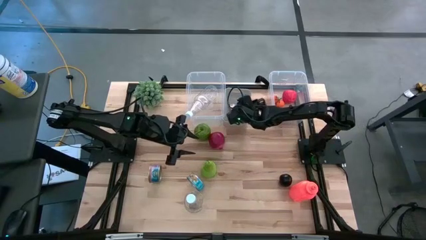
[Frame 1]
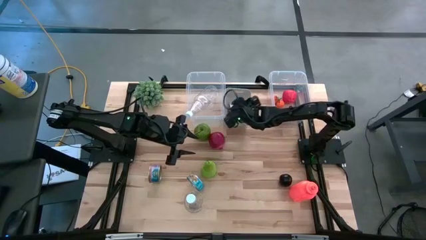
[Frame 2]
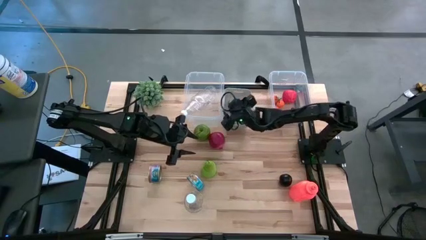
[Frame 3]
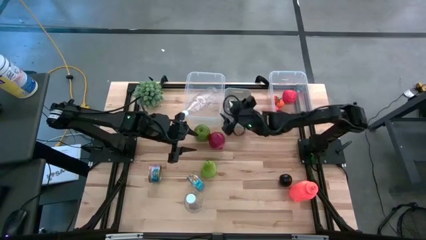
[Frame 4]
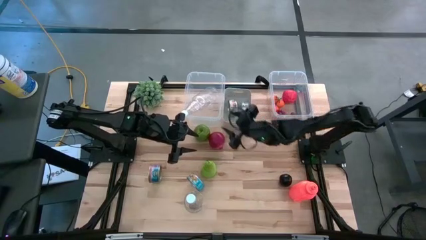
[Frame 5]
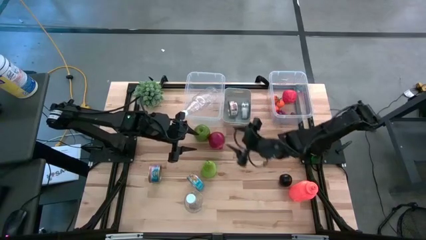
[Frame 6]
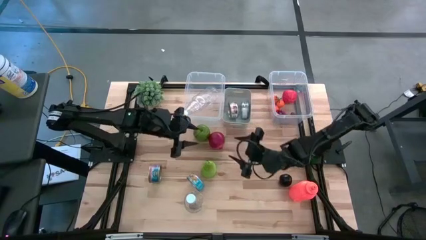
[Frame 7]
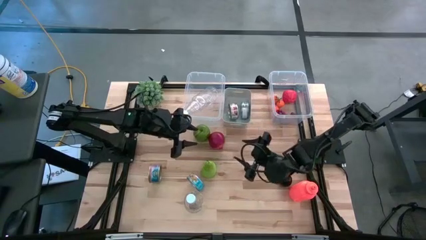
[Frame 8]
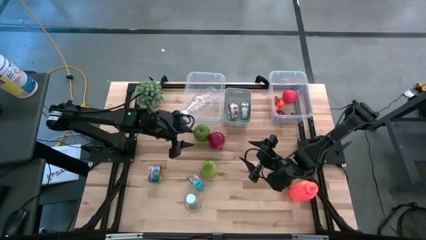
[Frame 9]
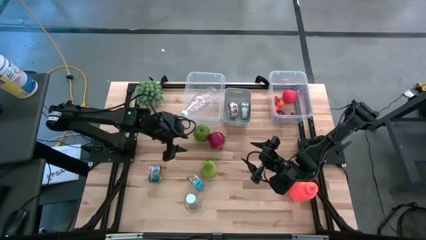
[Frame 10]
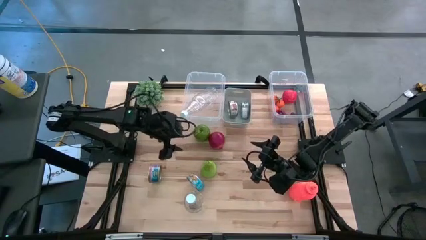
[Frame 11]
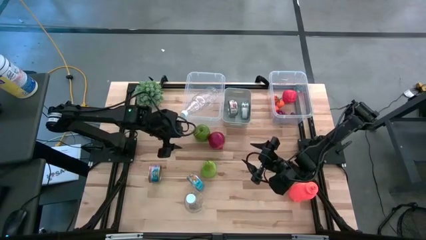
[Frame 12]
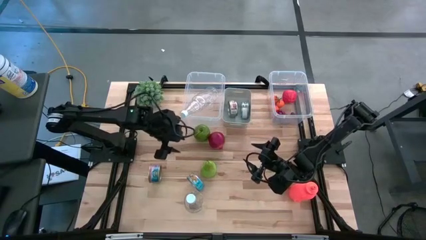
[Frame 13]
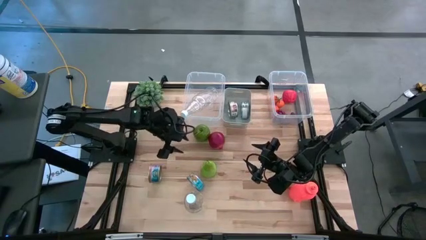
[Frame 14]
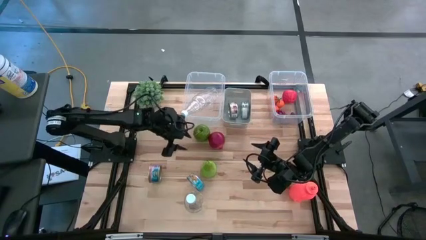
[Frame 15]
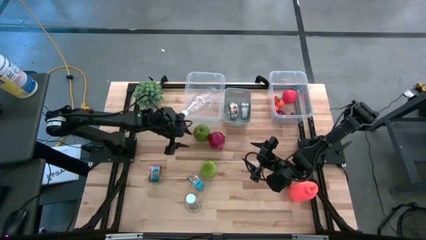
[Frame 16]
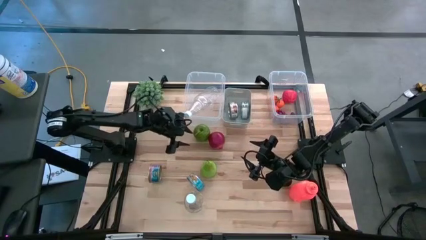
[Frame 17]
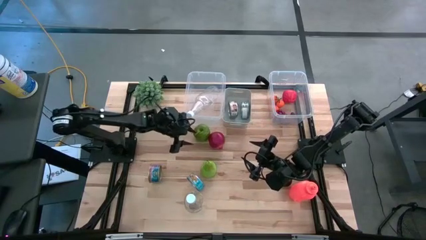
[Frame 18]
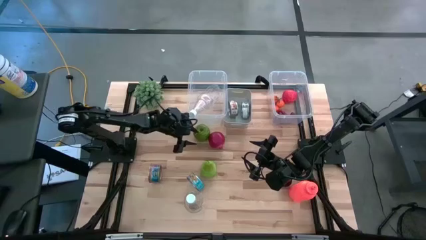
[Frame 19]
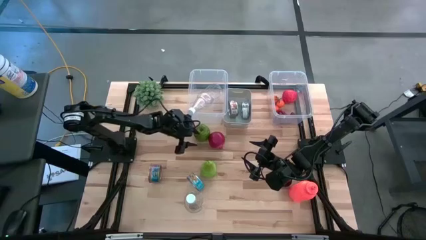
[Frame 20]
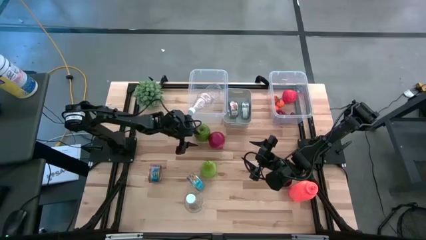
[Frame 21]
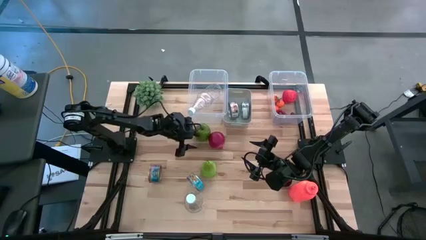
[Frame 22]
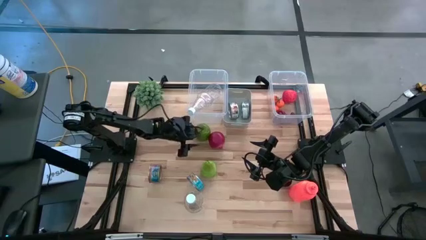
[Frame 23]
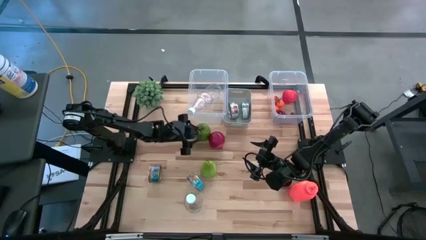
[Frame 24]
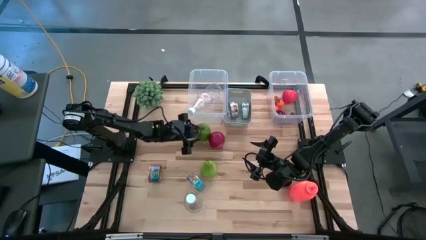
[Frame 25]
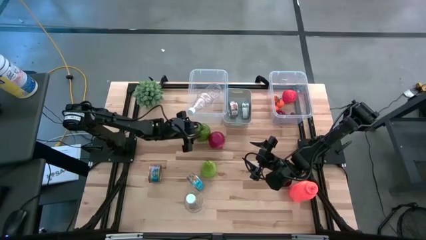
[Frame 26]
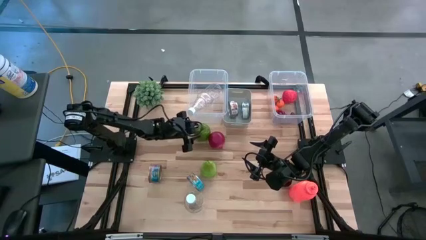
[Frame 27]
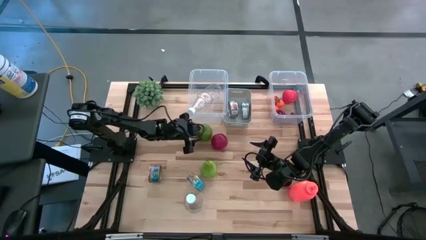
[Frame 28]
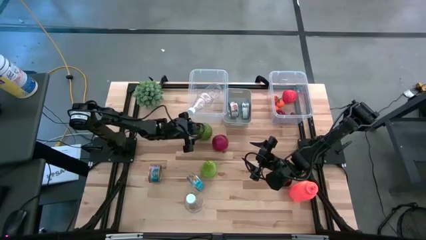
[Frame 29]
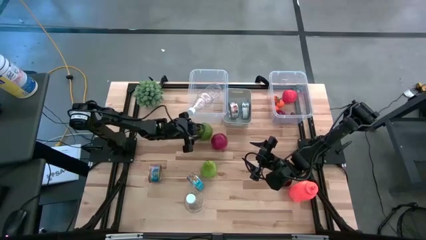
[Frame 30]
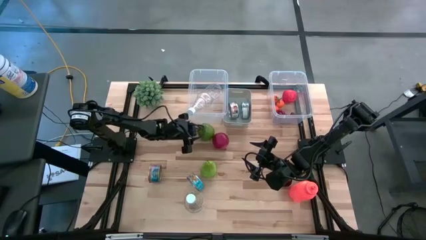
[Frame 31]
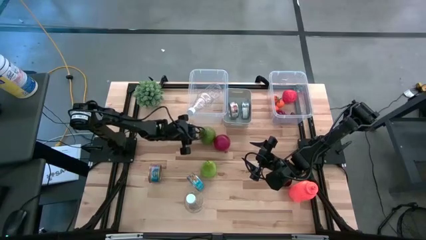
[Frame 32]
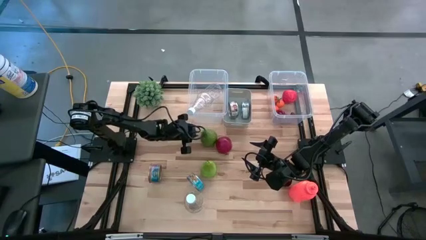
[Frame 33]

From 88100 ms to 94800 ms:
Task: Pick & Place Food Item
Put the green apple into the right transparent bin

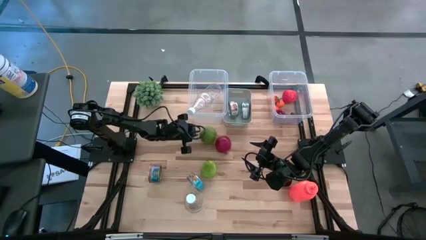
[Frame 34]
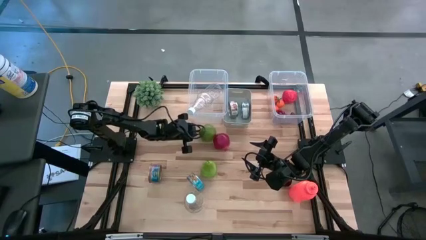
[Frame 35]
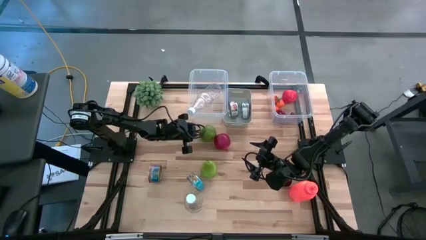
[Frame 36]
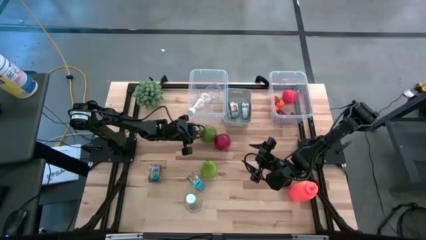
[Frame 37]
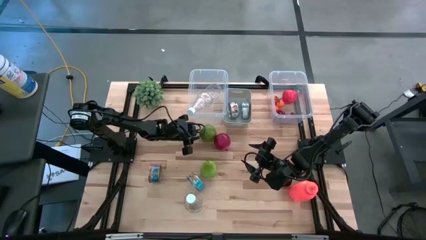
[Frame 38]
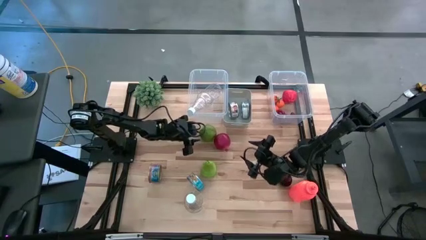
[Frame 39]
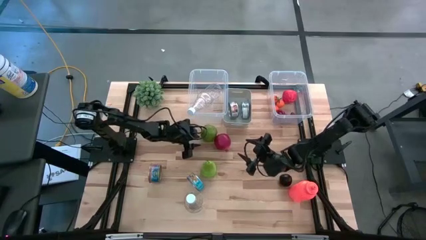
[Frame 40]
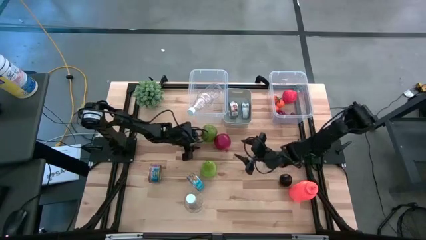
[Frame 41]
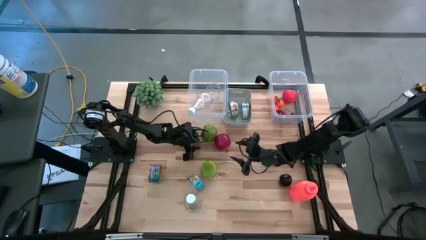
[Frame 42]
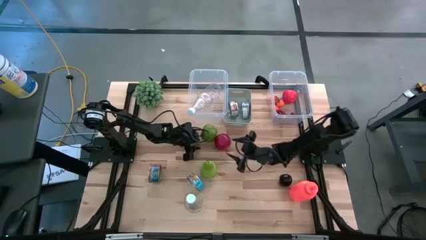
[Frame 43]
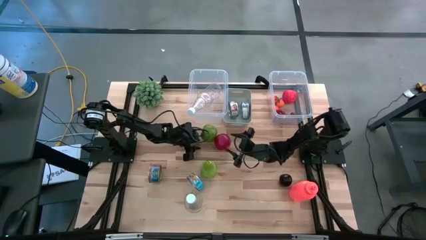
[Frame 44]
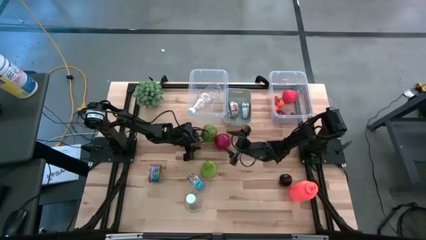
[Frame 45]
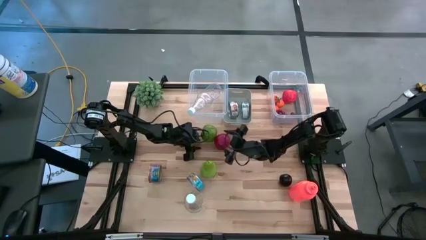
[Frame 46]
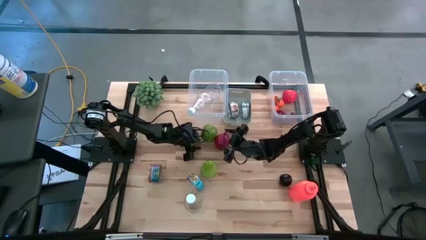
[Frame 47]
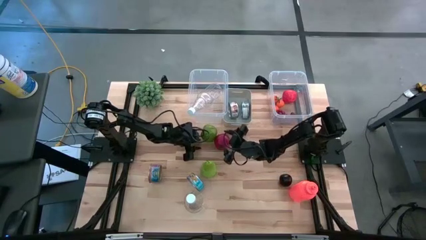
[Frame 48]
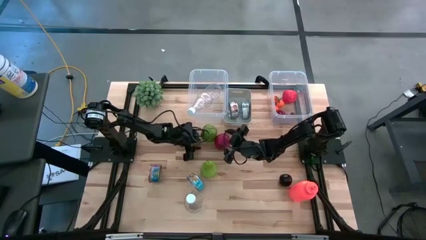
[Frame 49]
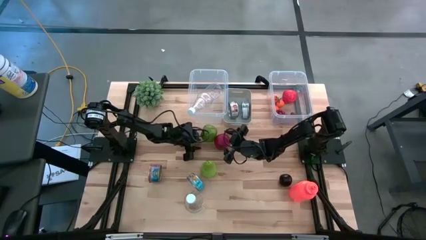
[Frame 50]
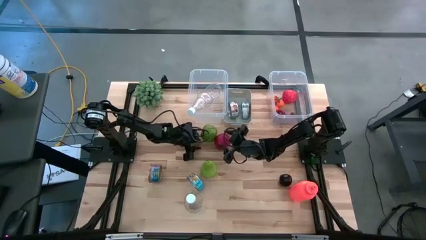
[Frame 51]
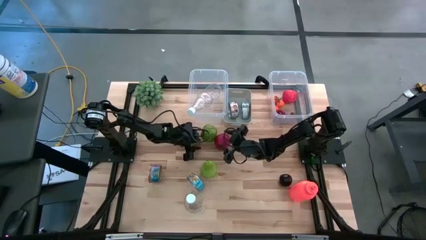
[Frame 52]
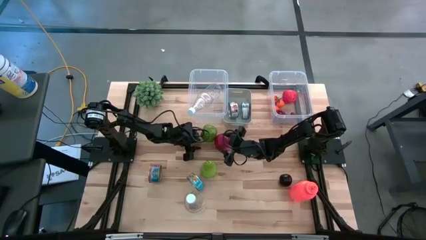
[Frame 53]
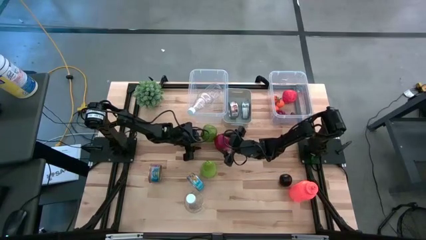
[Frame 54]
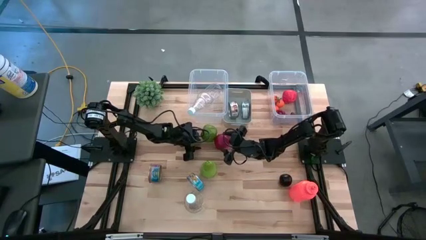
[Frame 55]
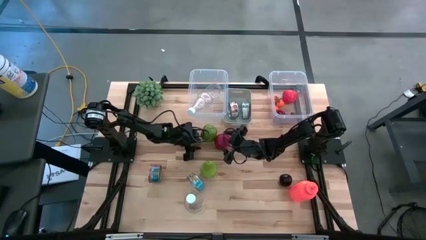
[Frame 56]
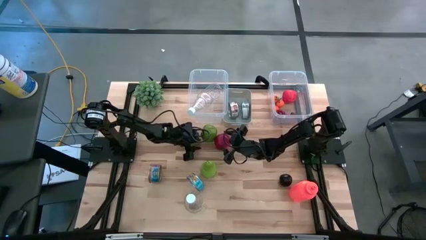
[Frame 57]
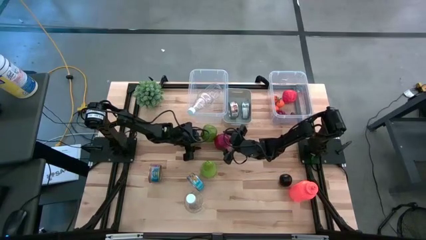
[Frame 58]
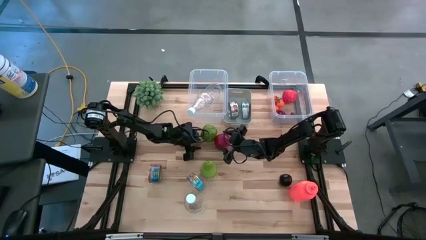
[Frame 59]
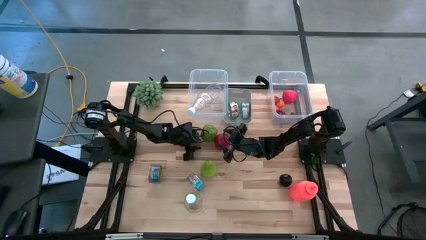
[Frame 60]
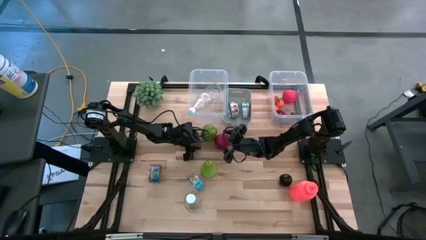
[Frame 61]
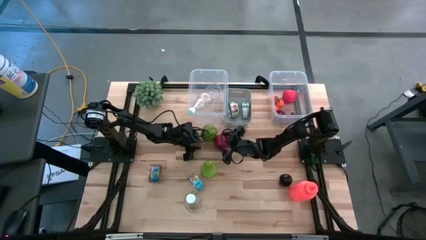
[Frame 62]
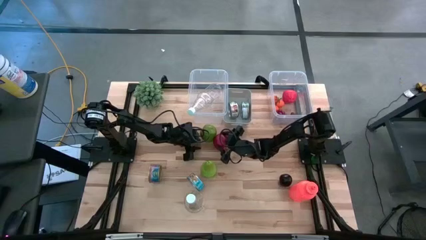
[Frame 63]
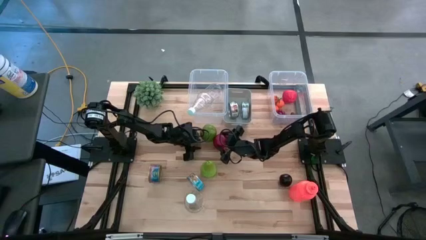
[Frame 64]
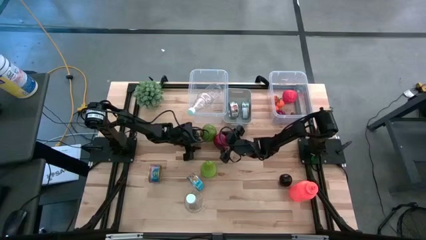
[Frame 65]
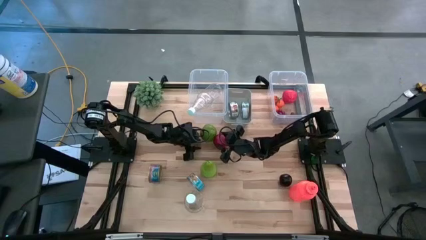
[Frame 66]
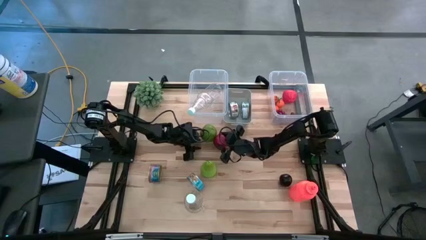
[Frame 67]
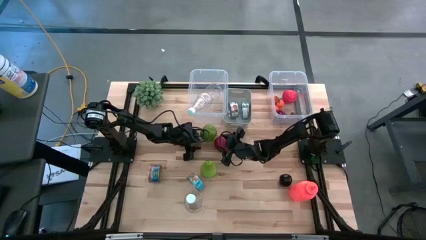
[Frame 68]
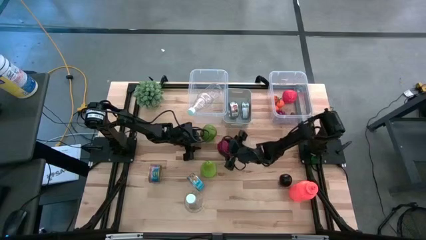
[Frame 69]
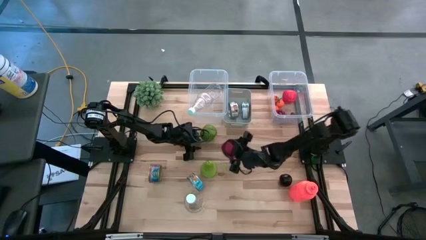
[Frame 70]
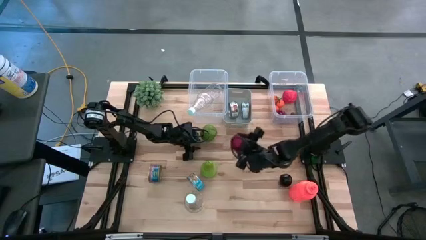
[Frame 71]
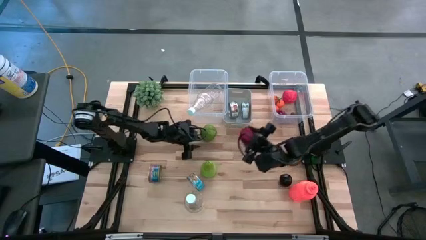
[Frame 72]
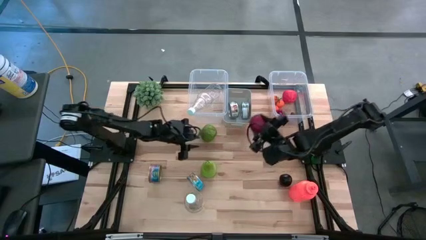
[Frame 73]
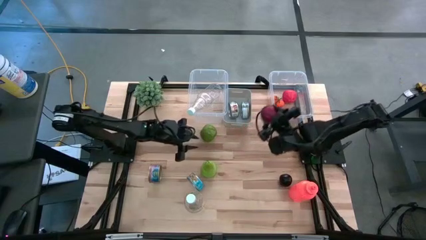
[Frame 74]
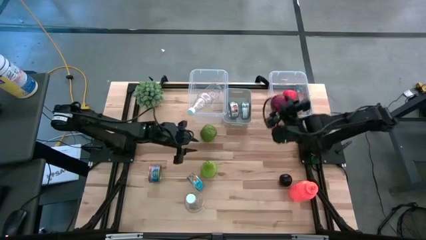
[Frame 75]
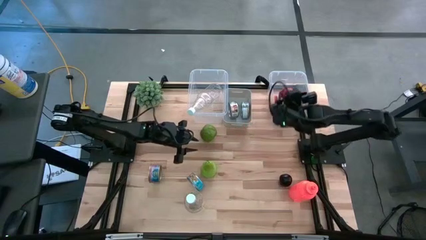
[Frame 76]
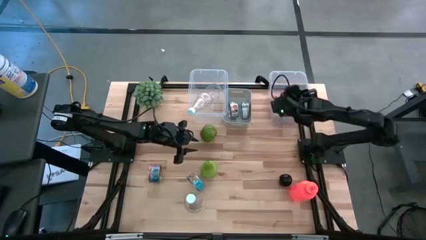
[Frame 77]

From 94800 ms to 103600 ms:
Put the pomegranate in to the right transparent bin
